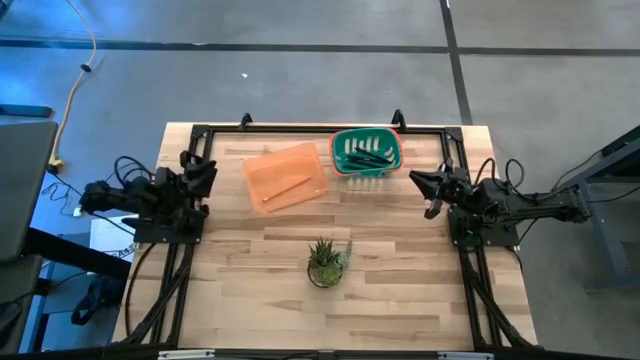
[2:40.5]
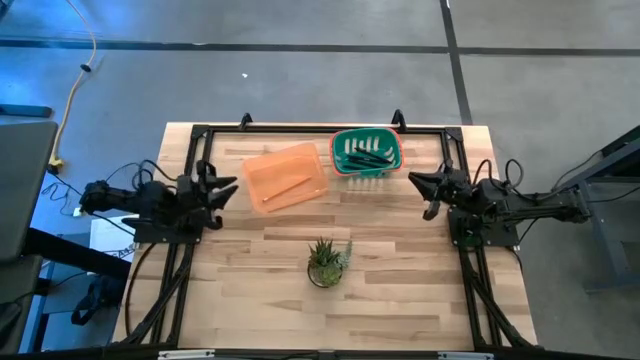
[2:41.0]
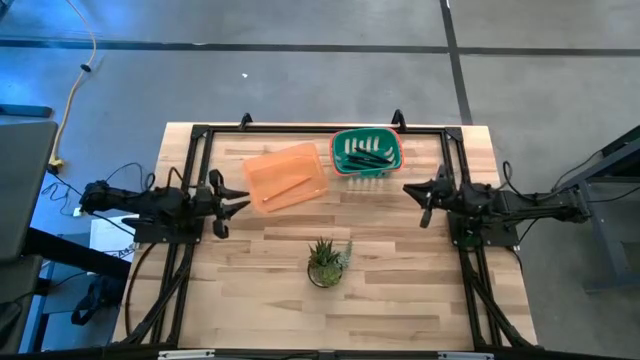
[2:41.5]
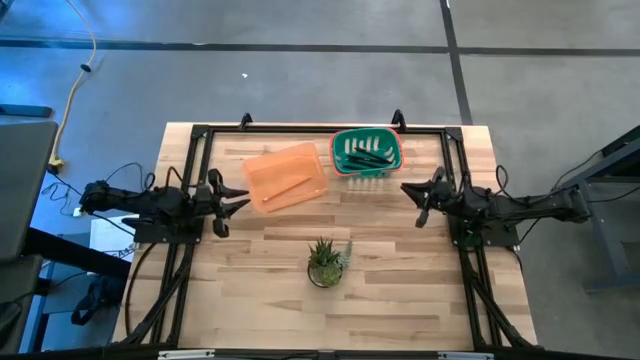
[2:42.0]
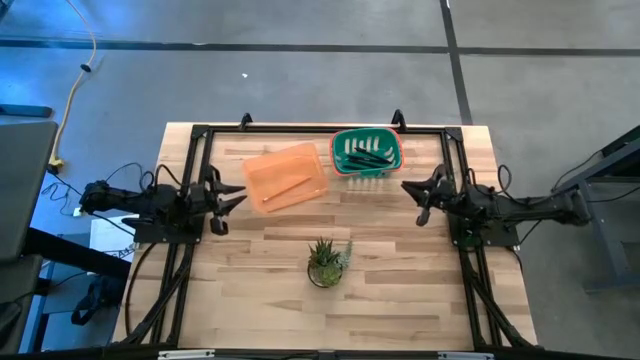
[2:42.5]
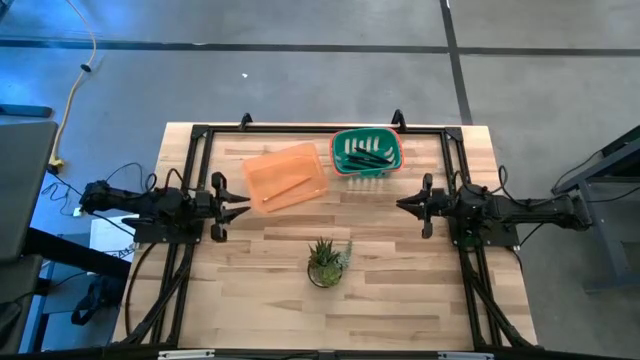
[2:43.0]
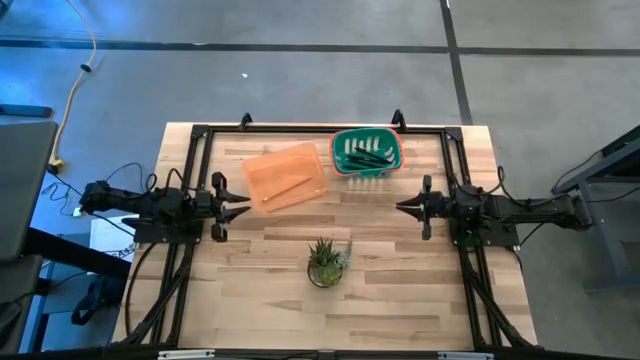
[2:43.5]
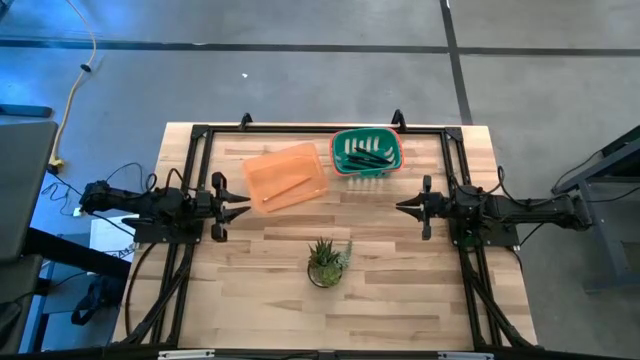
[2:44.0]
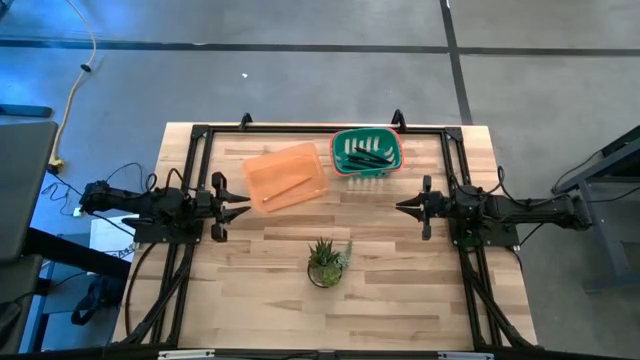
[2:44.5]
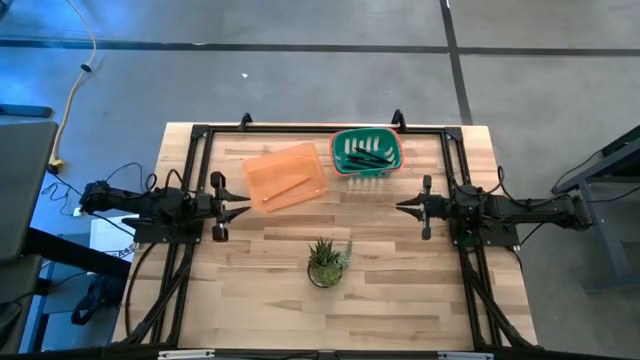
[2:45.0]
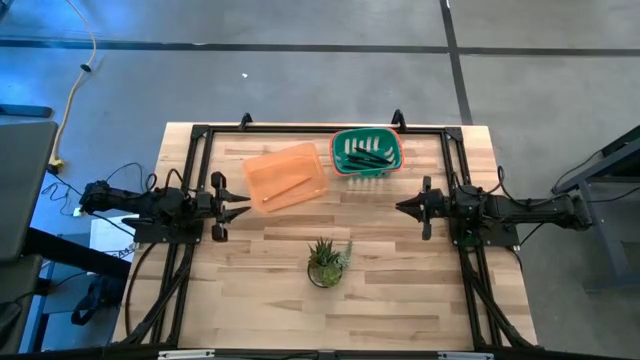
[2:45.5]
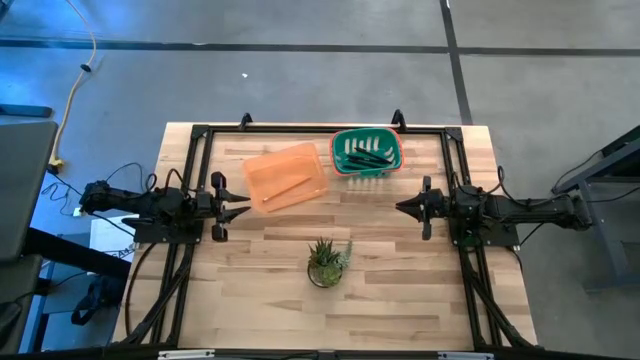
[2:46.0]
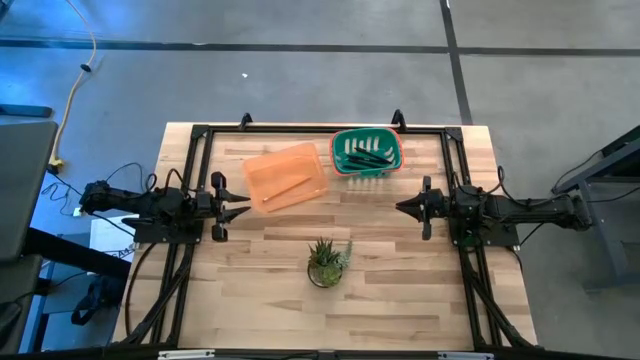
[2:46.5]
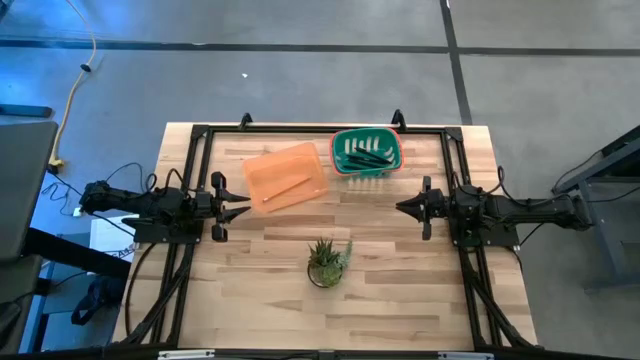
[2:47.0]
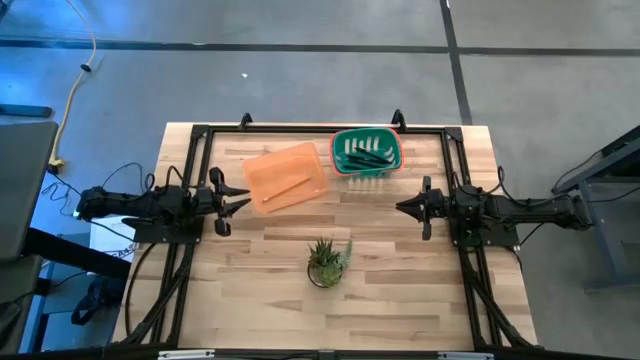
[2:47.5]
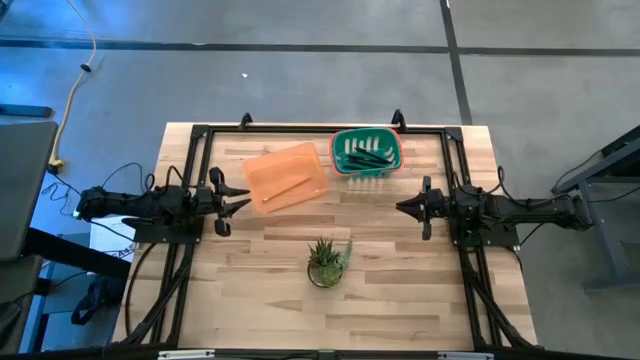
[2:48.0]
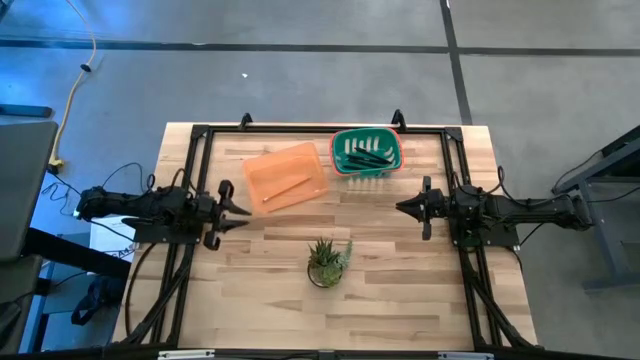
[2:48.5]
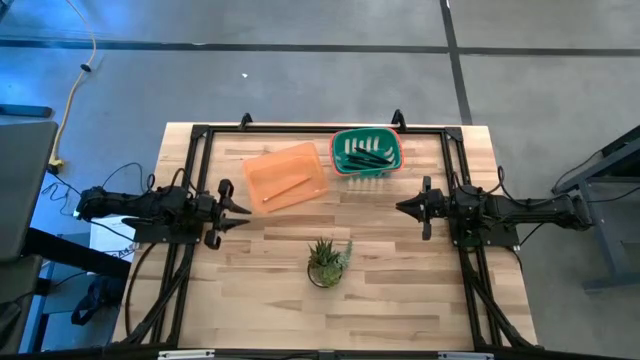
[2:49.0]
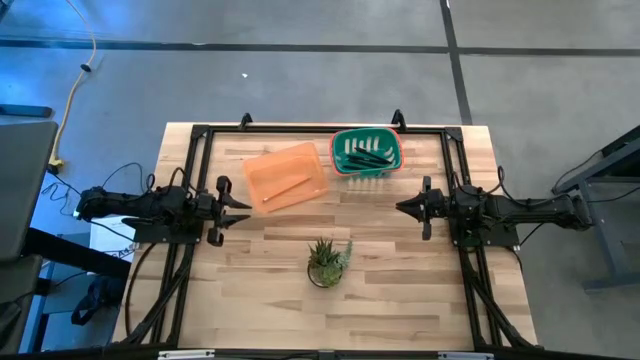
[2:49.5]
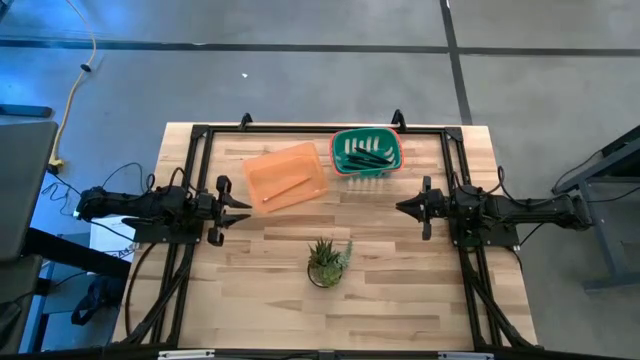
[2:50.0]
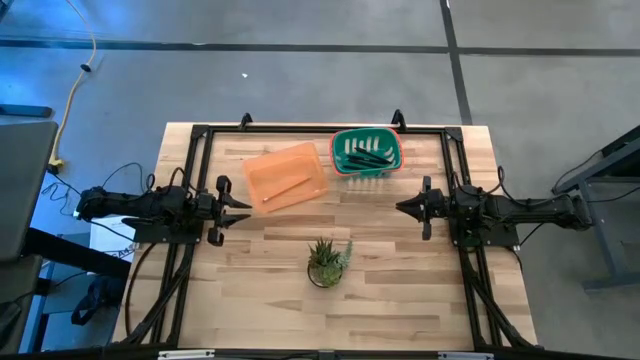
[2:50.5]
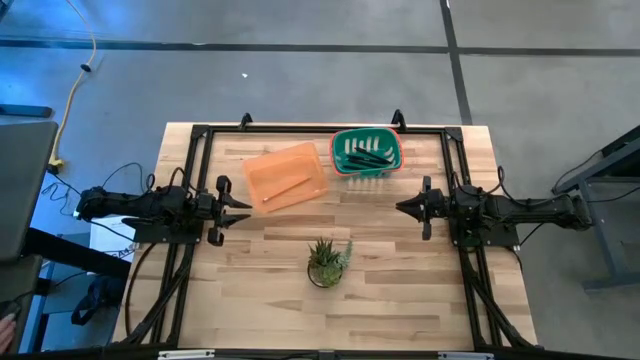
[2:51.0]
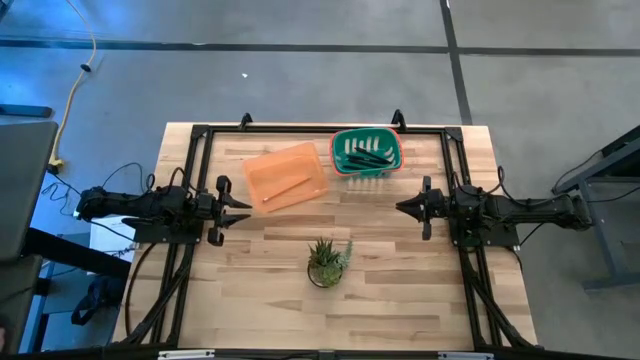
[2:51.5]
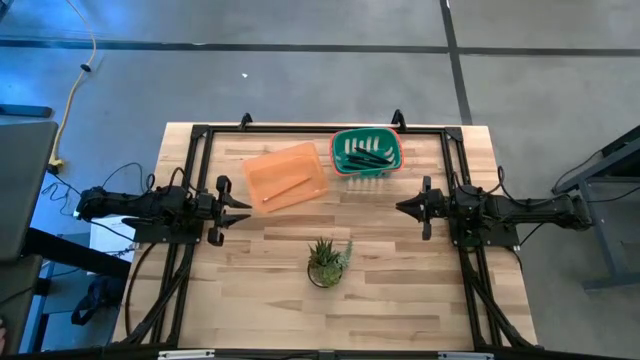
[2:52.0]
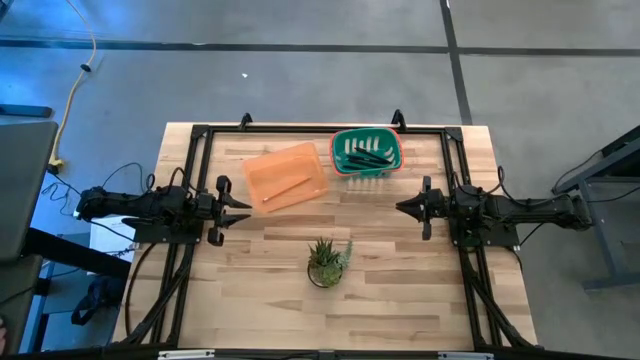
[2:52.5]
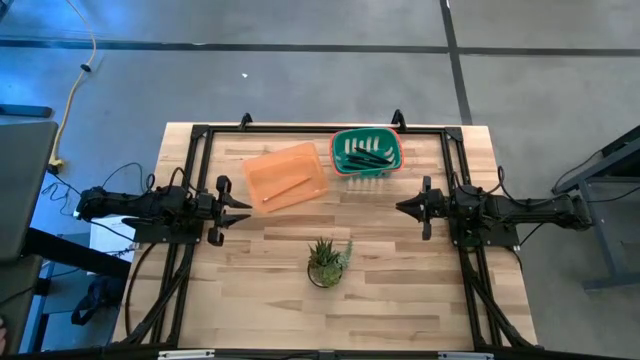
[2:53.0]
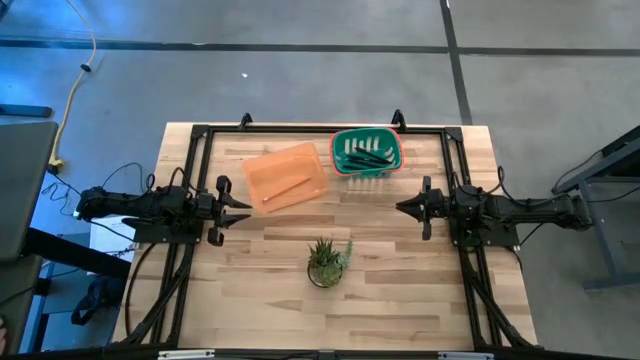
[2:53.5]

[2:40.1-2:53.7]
Task: Sort pens & pencils
Return to Home Position

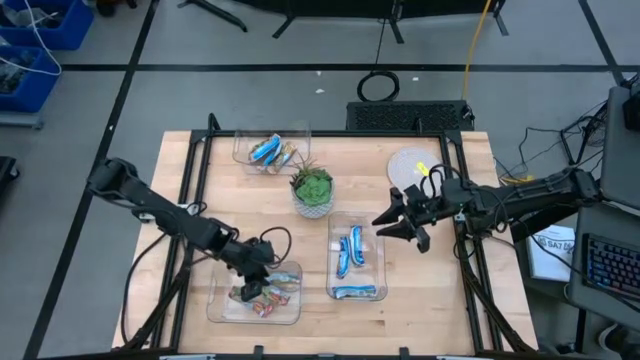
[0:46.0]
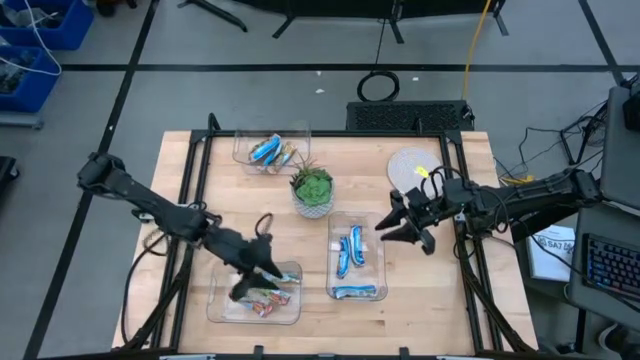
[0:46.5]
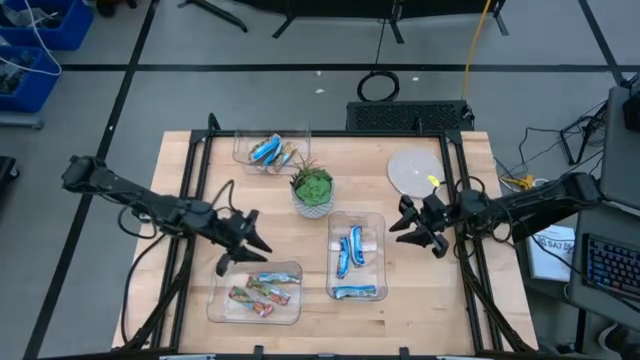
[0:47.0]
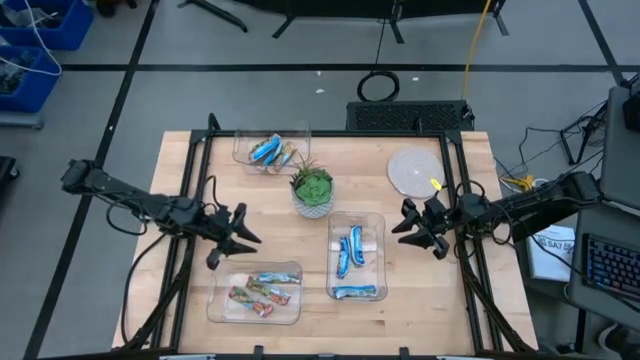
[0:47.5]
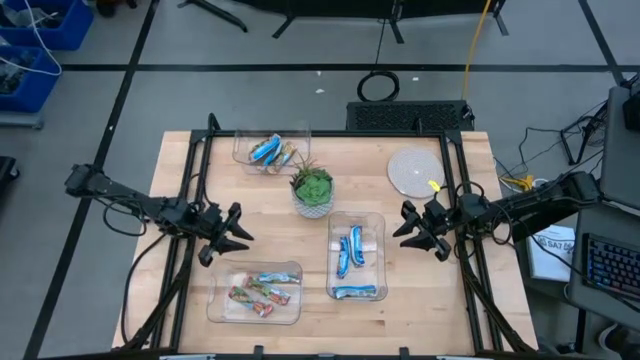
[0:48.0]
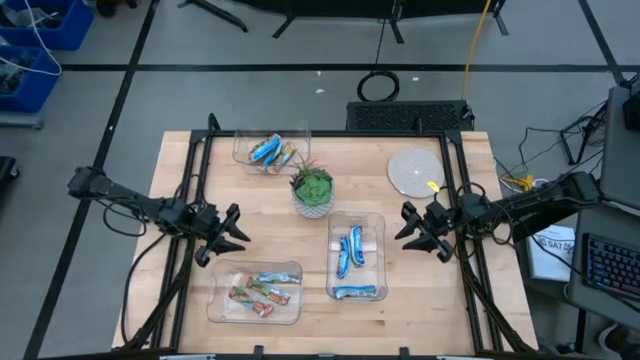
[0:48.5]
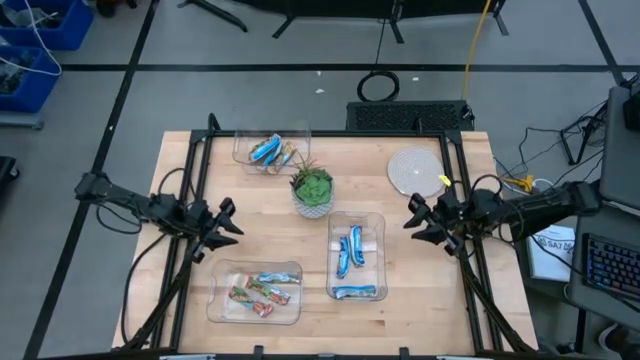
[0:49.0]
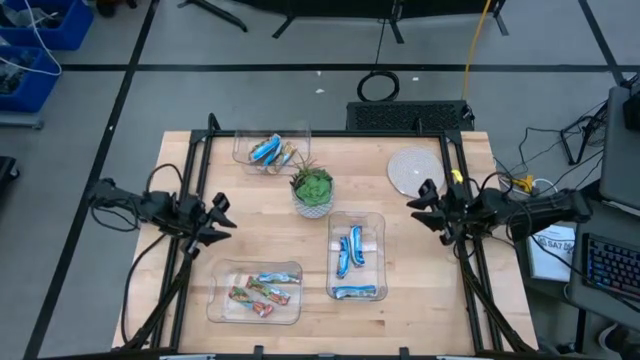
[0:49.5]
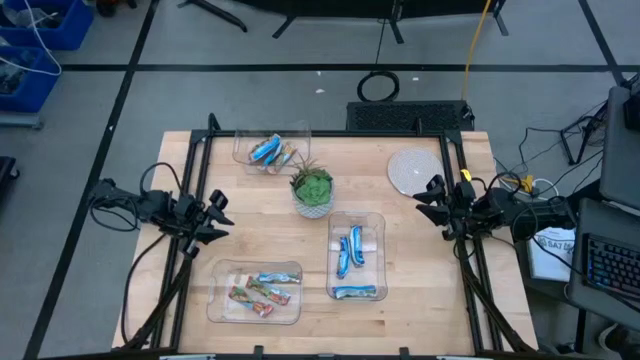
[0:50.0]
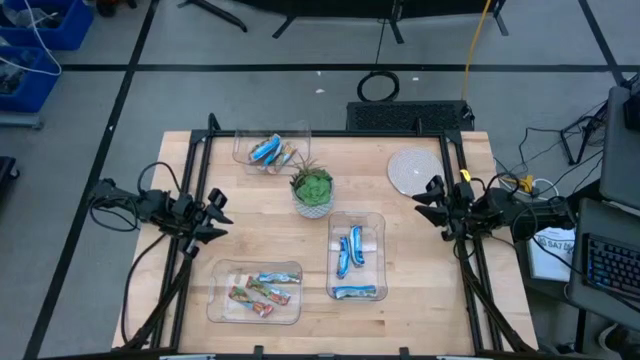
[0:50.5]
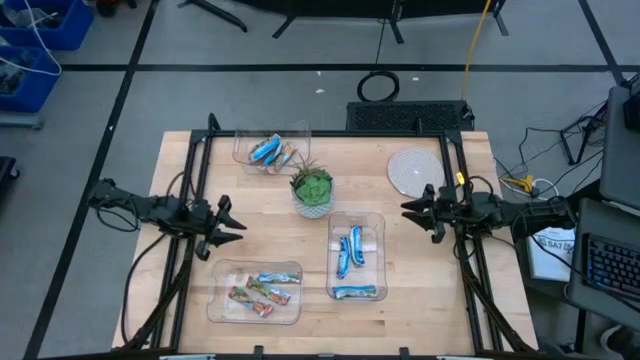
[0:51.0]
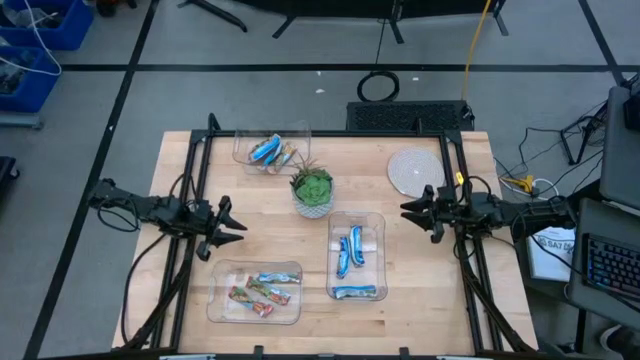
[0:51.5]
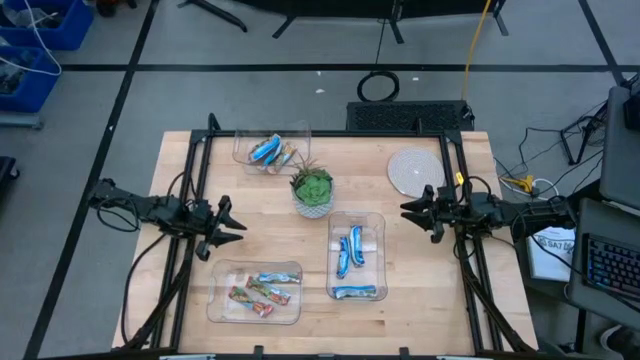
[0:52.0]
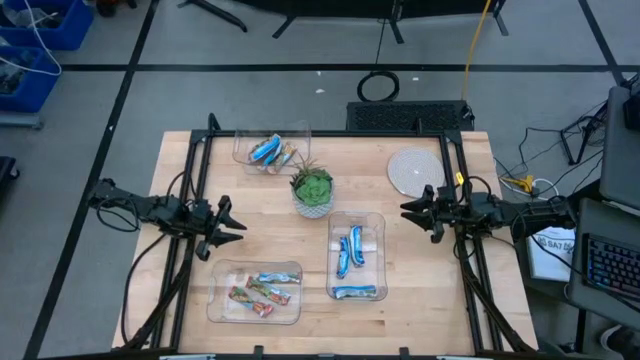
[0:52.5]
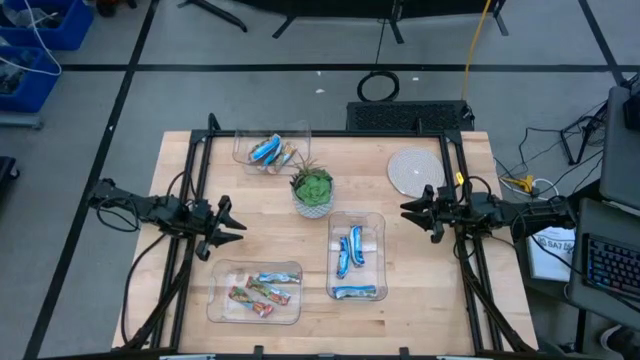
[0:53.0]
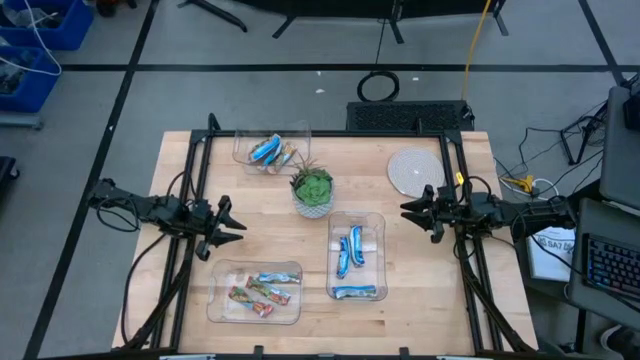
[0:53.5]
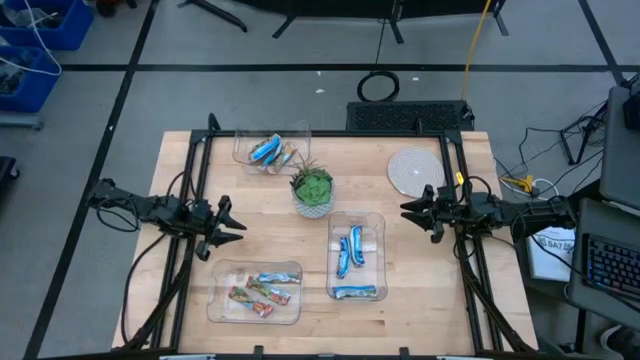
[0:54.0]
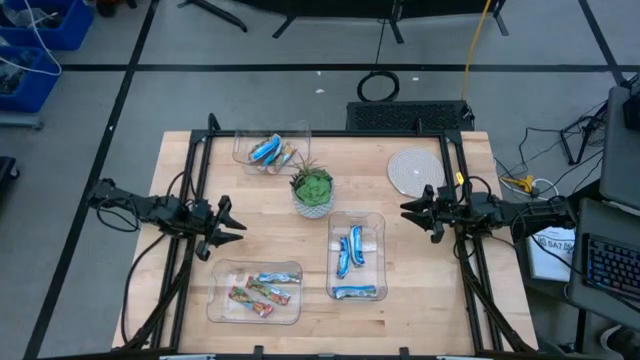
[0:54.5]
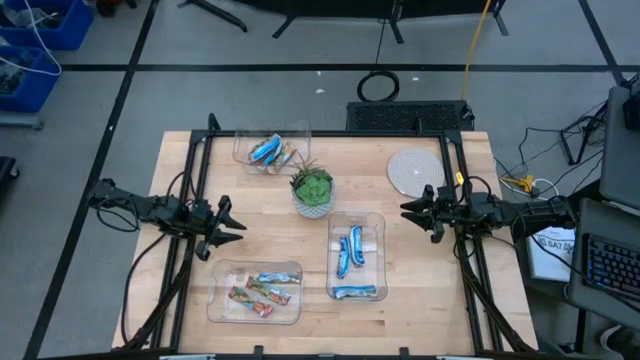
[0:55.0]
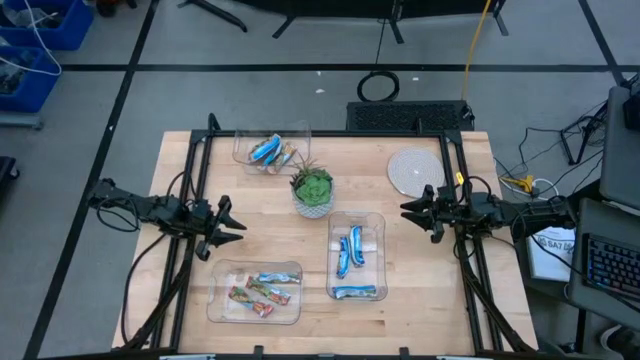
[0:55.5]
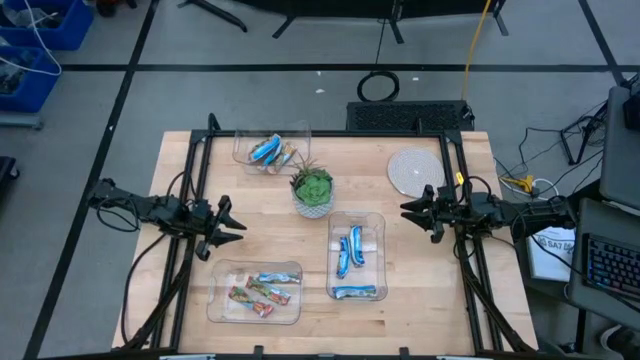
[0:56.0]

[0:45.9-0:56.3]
Task: Pick and place Granola Bars by type
Return to Home Position
